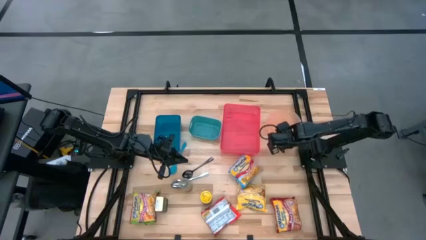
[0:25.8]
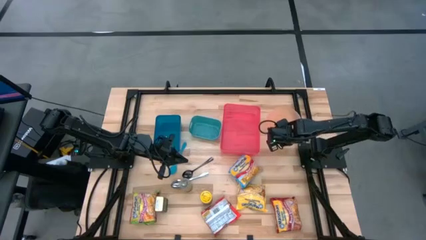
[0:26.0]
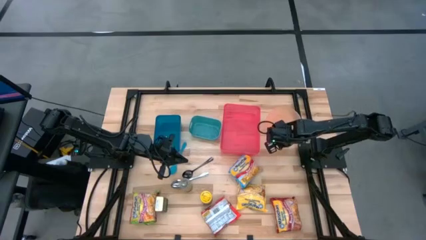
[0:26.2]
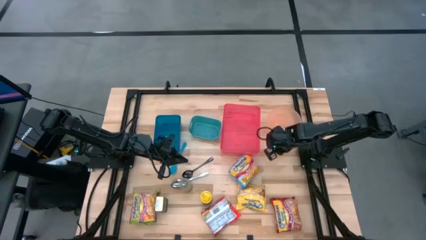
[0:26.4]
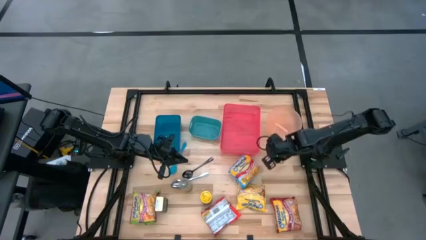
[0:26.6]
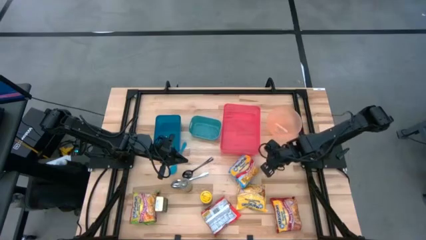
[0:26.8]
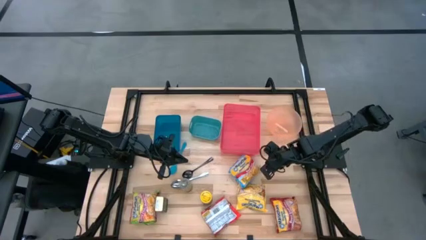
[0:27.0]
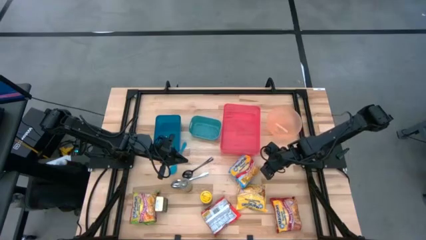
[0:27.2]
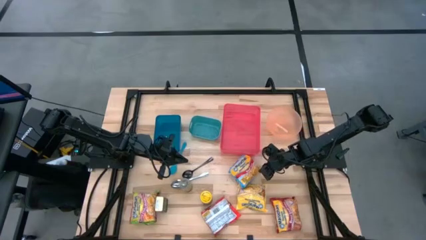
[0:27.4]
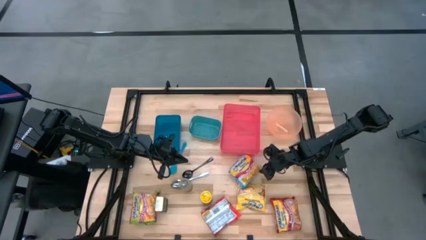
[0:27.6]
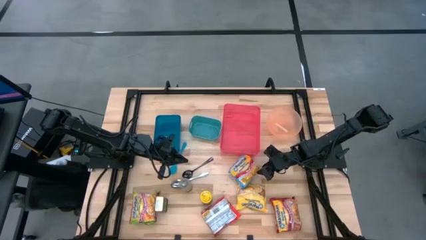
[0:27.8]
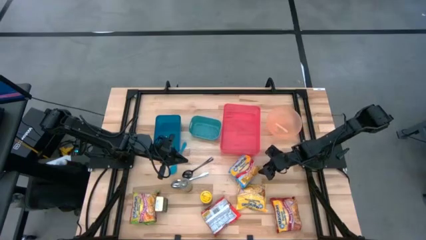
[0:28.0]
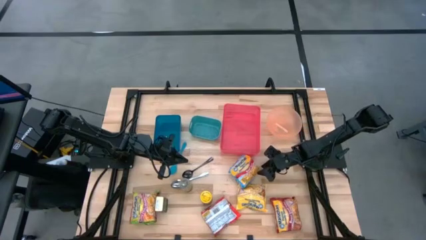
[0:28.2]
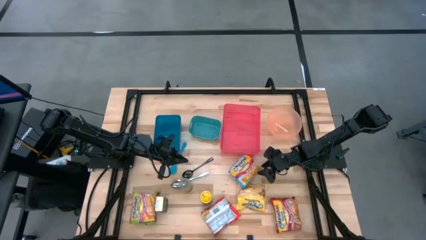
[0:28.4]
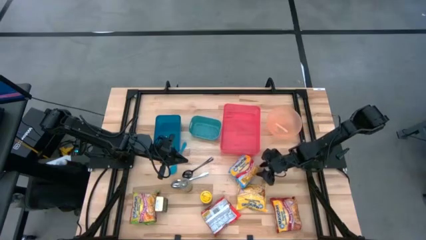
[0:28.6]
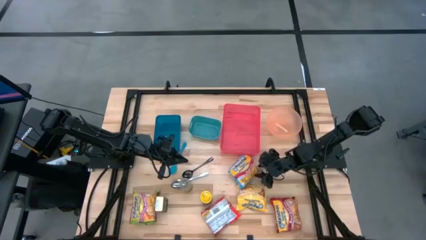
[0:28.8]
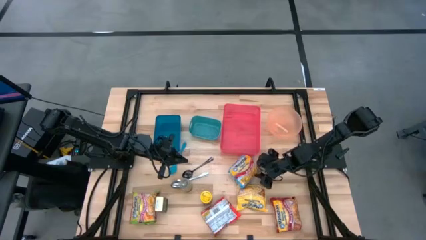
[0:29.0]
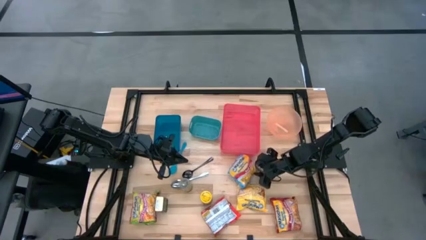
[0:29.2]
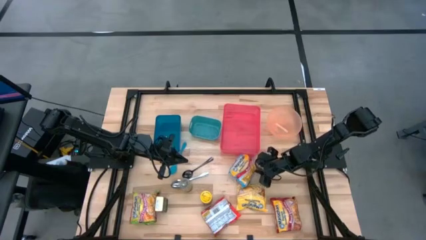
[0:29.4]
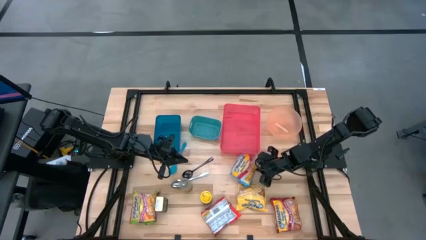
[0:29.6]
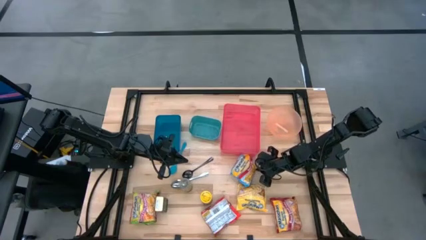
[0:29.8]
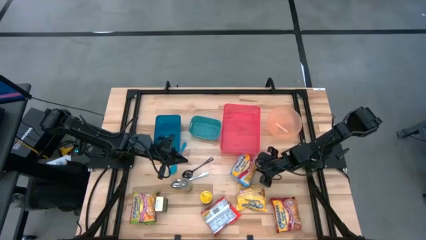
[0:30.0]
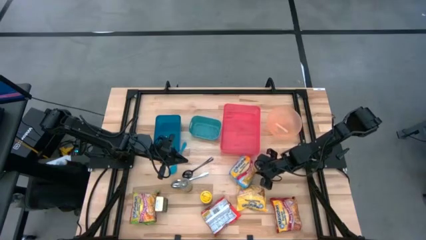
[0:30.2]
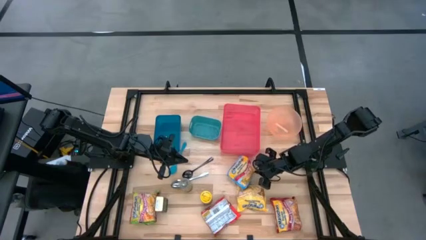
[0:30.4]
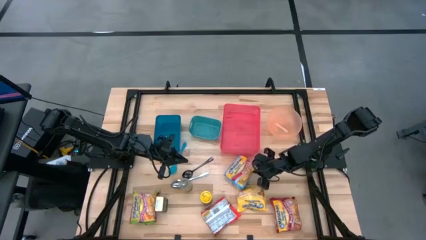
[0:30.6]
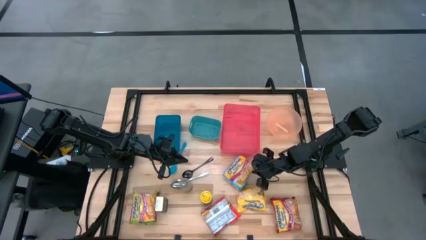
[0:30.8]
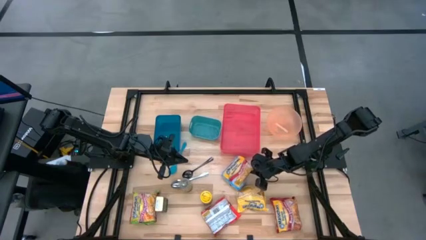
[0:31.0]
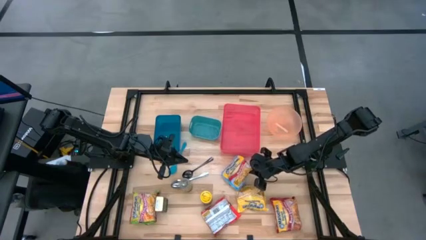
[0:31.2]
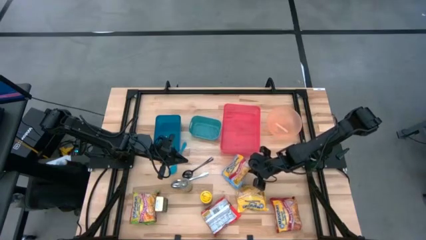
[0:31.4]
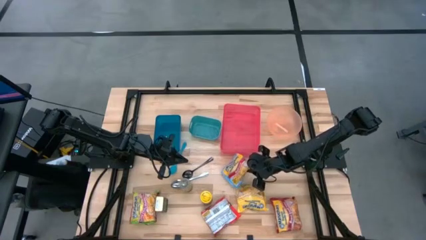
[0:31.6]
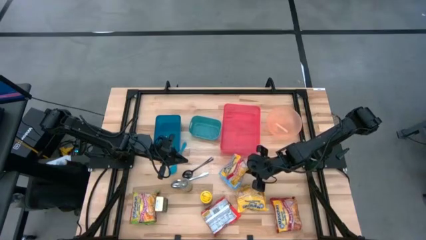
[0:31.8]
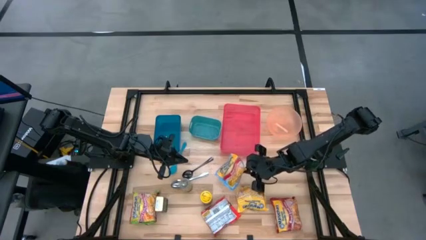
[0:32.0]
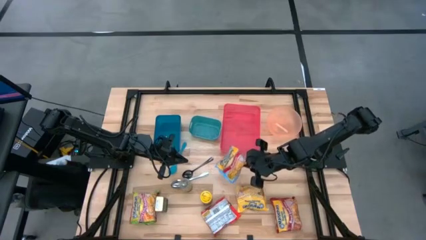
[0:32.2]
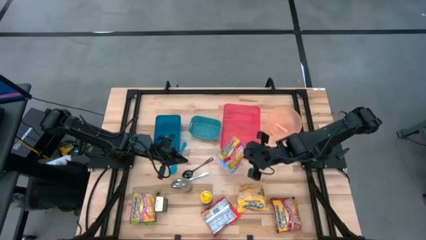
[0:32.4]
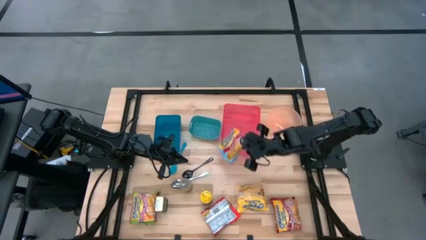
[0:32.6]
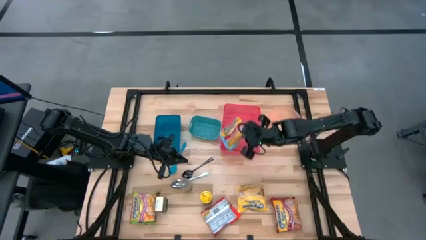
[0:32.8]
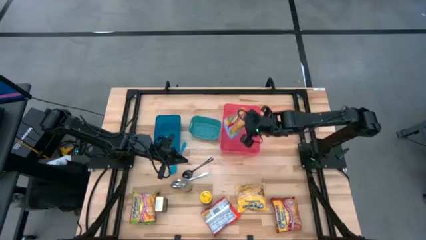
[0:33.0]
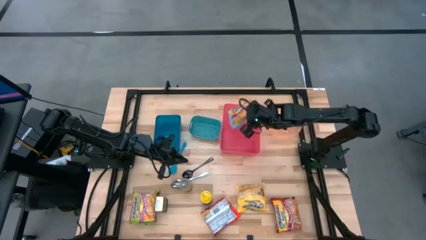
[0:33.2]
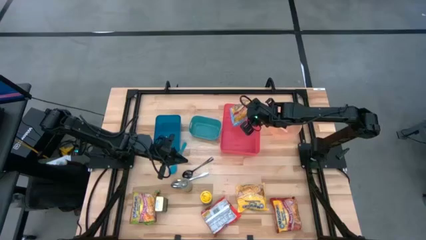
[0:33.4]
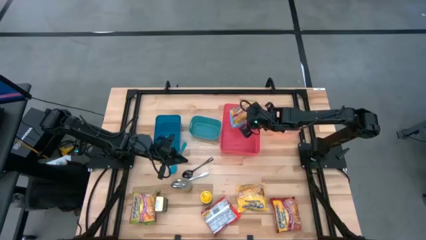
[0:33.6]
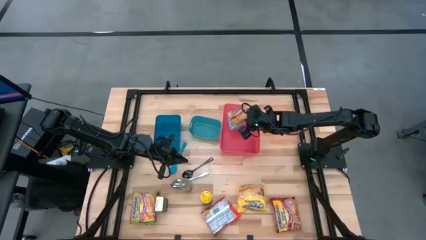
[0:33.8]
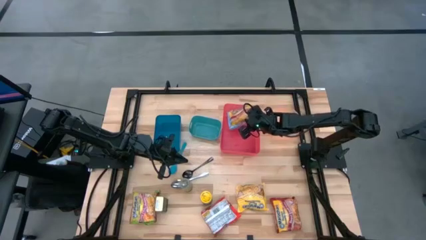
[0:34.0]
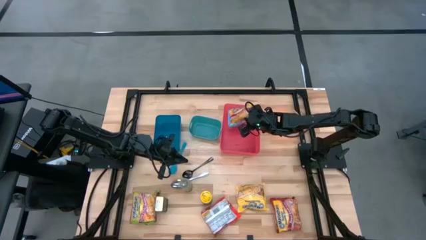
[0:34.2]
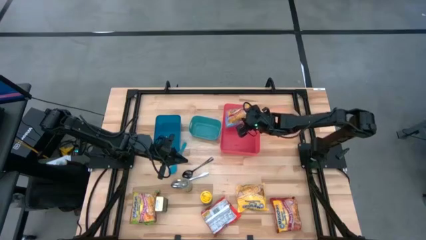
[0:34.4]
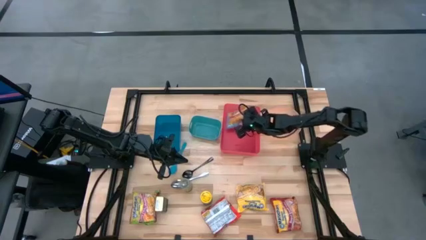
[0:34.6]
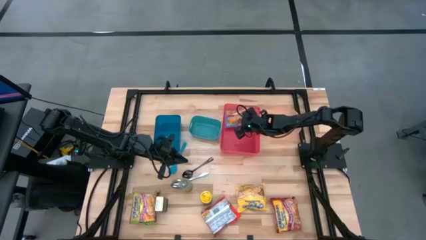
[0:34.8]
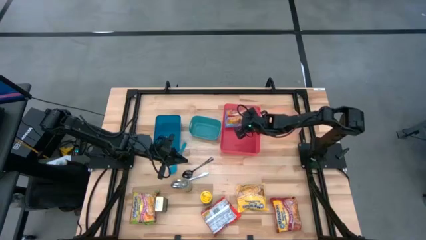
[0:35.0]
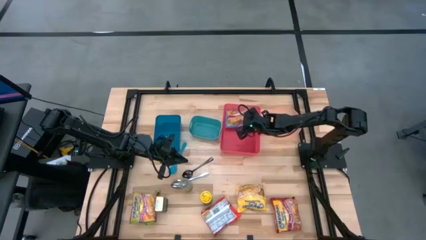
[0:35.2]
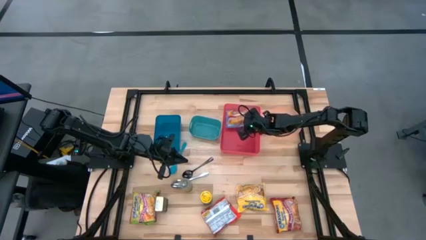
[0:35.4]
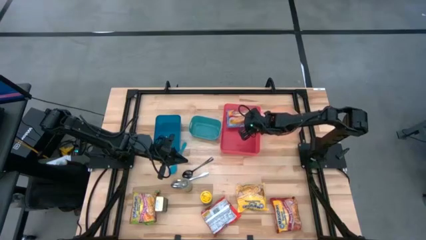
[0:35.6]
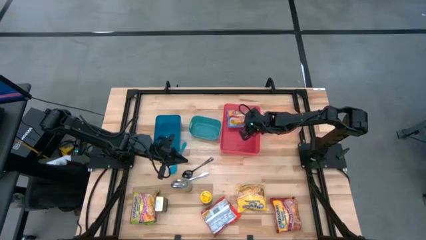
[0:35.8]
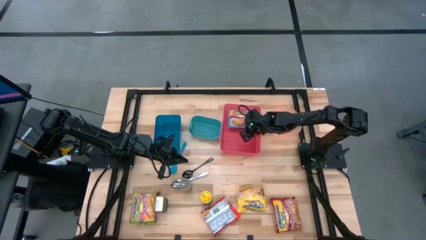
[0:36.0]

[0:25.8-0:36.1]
Task: Pick & Place Food Item
Put the light blue noodle pack into the red bin

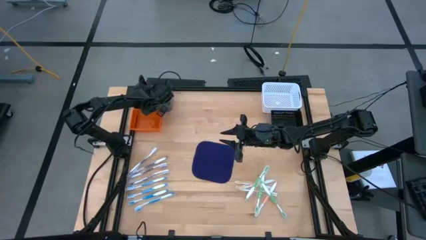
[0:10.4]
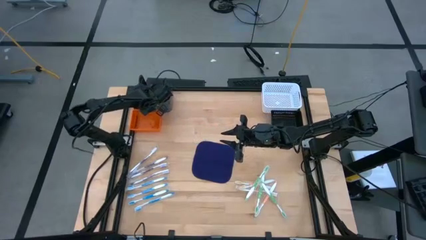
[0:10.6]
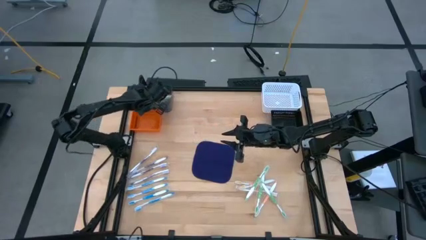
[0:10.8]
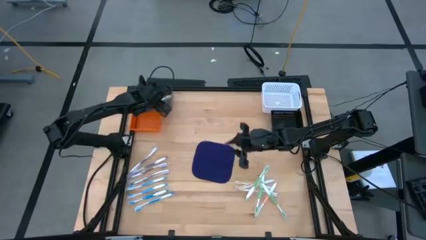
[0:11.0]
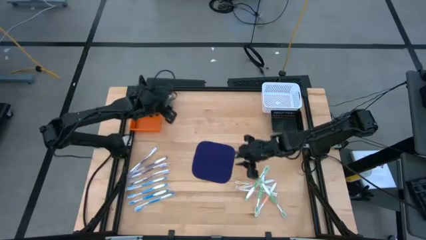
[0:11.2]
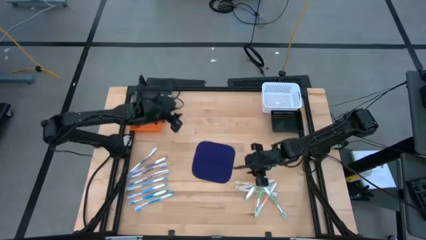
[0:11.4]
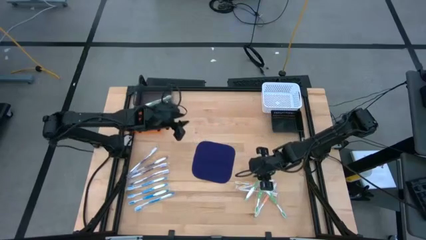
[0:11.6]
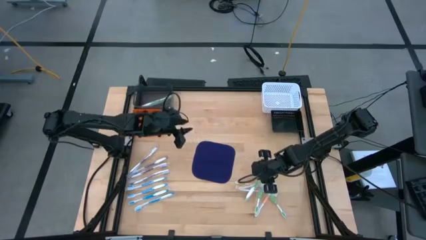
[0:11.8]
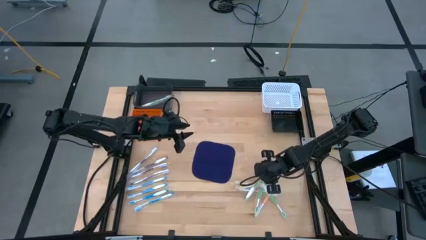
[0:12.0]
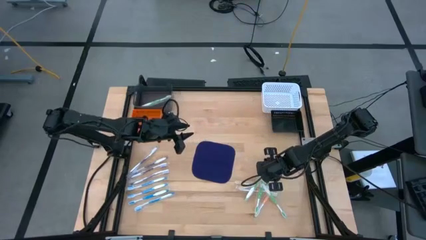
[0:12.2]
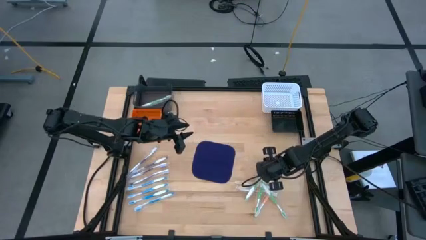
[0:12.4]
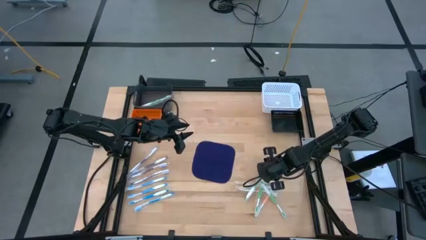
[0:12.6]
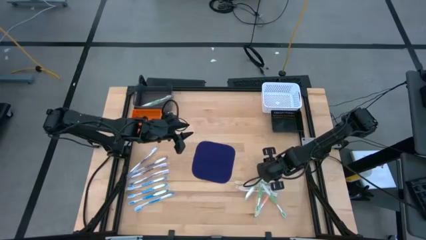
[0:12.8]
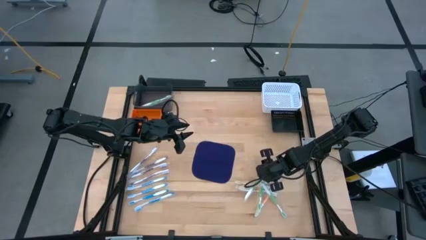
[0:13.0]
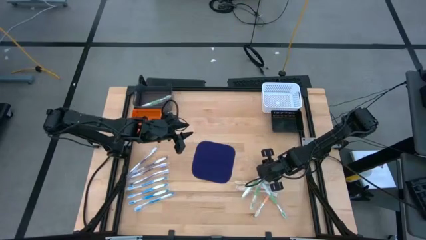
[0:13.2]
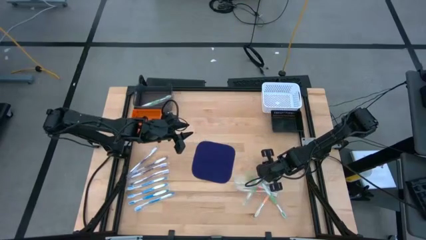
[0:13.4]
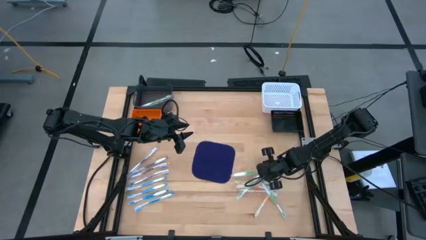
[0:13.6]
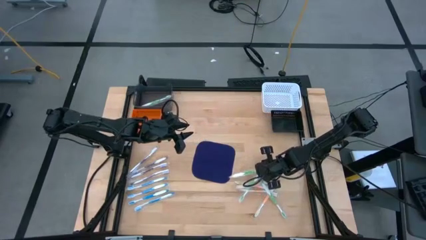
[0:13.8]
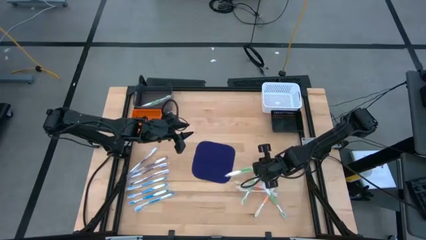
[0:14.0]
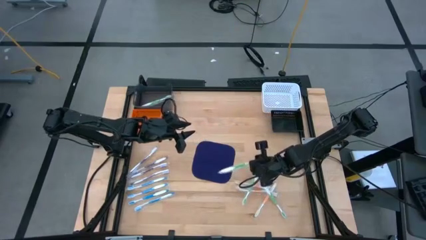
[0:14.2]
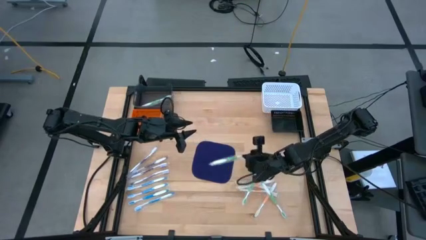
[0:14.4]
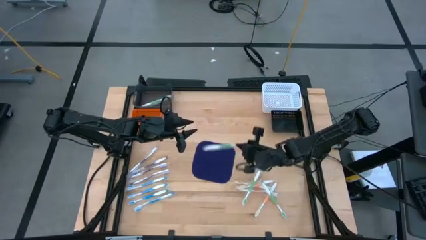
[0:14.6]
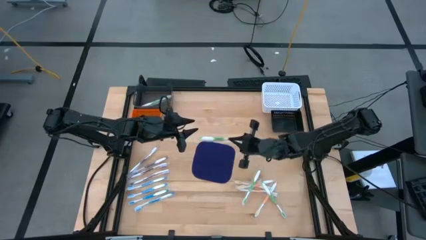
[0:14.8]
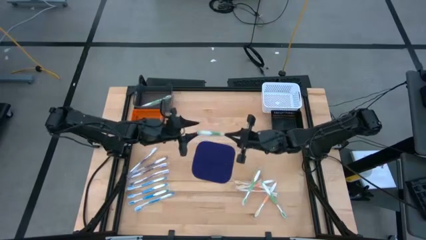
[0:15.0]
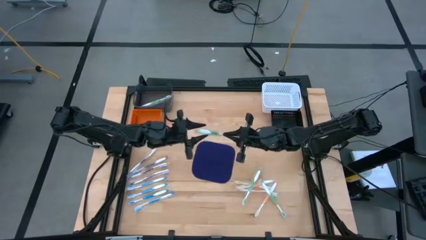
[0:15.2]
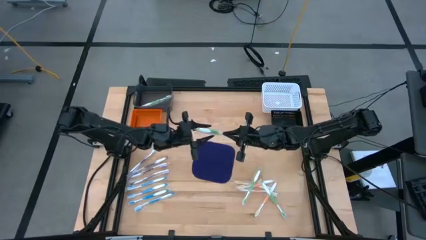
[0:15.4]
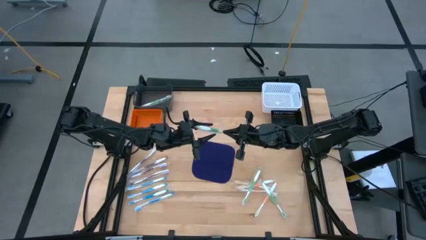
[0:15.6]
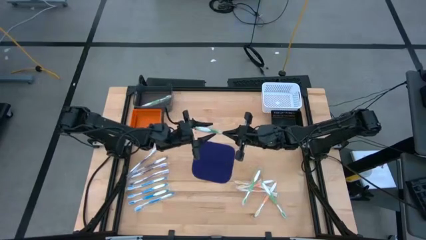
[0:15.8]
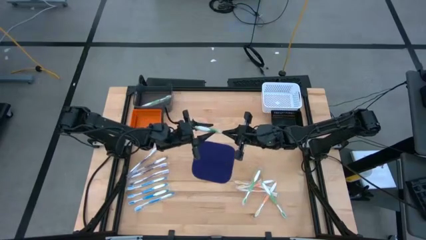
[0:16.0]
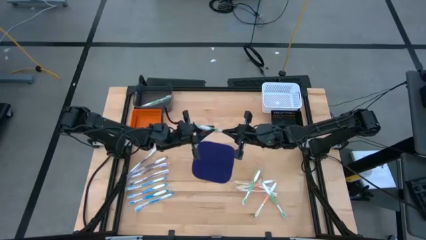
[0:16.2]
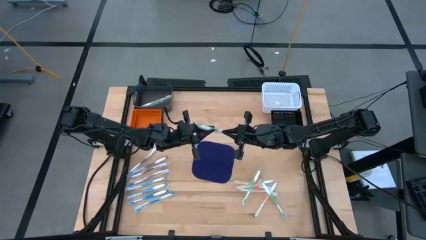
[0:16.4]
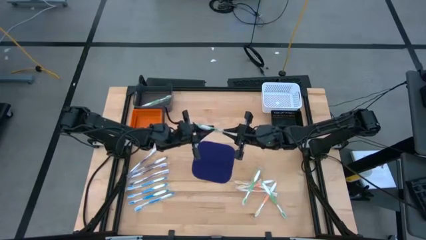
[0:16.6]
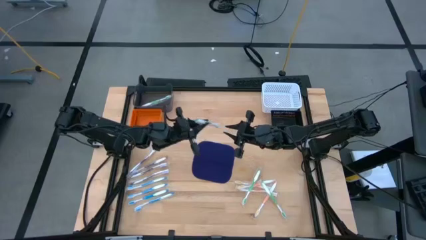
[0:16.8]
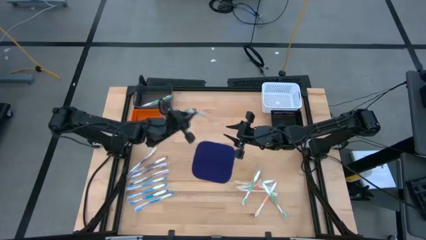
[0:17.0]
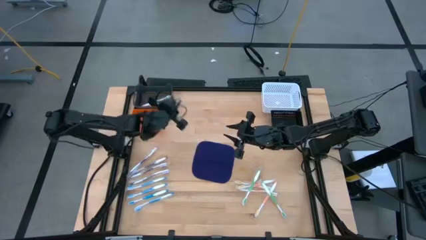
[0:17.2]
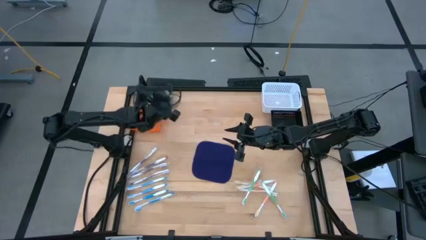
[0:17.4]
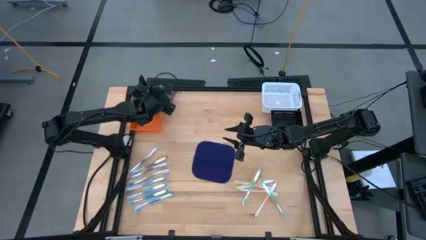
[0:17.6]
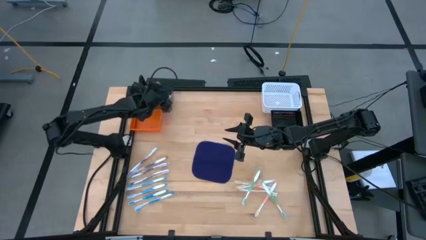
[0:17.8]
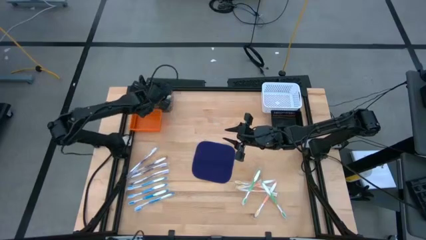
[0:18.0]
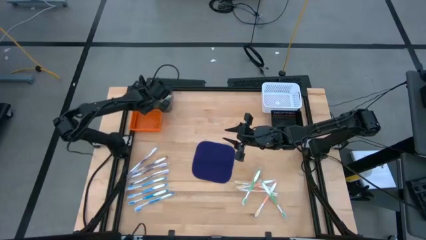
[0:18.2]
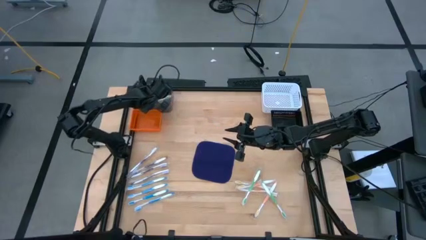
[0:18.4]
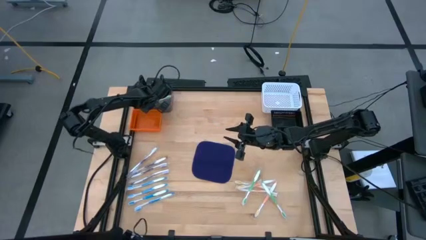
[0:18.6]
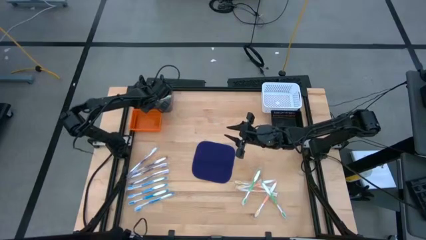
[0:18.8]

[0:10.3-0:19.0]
Task: Pick & Place Toothbrushes
Put the green toothbrush into the gray bin
